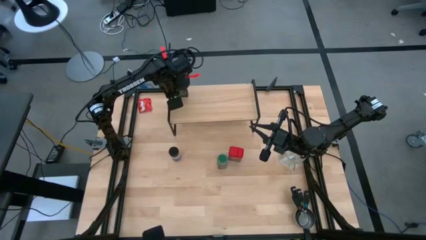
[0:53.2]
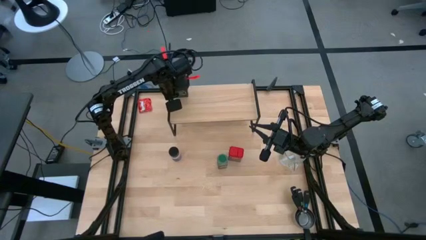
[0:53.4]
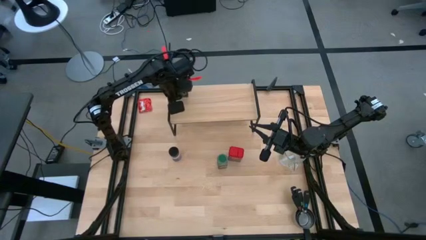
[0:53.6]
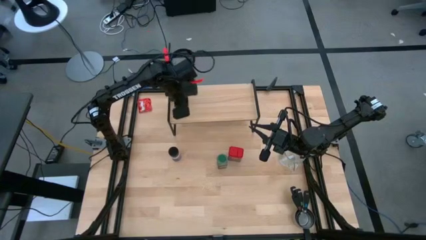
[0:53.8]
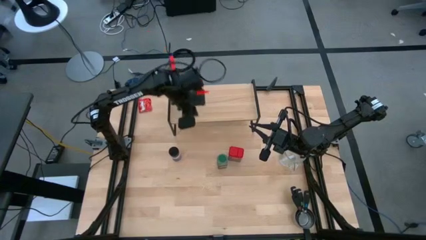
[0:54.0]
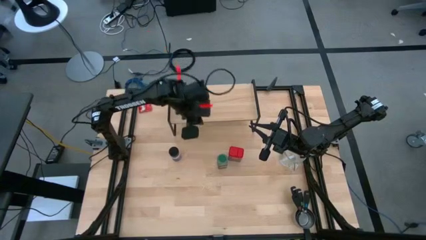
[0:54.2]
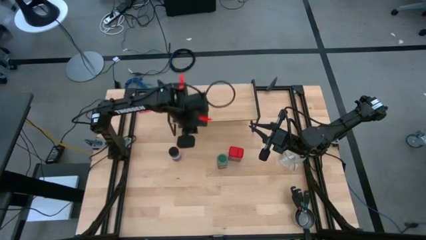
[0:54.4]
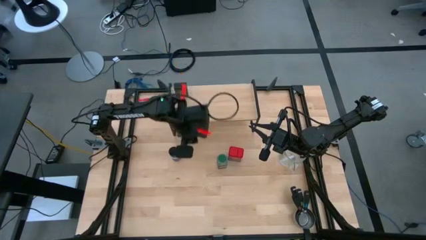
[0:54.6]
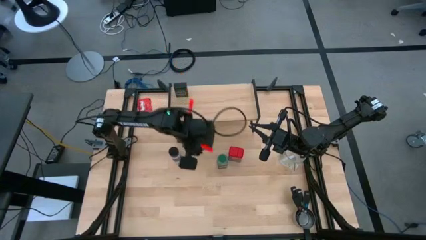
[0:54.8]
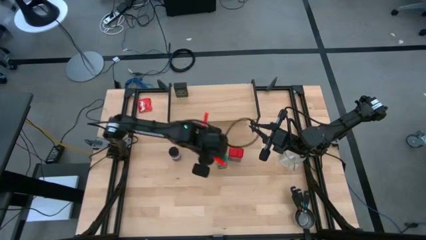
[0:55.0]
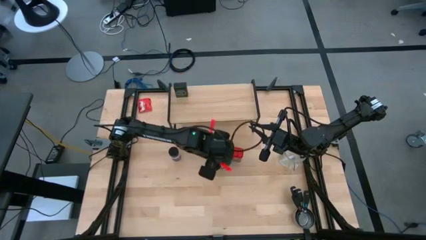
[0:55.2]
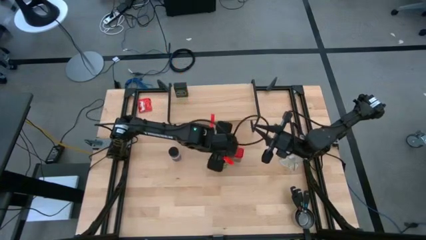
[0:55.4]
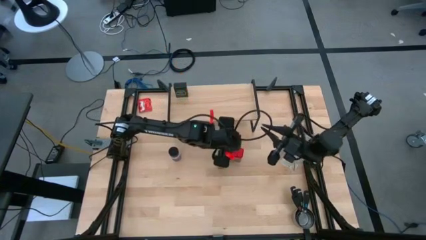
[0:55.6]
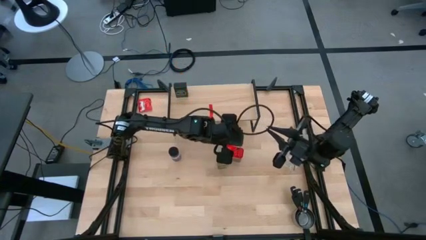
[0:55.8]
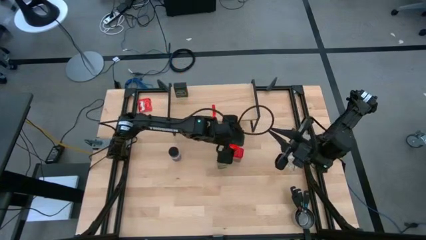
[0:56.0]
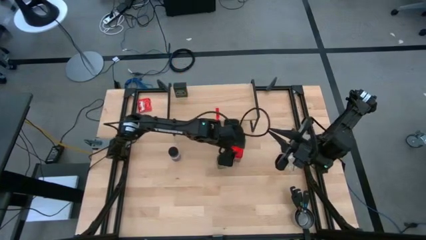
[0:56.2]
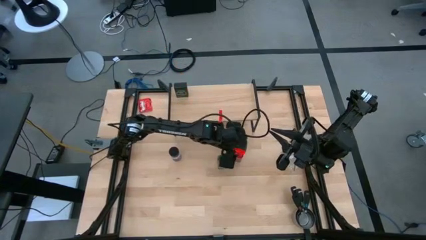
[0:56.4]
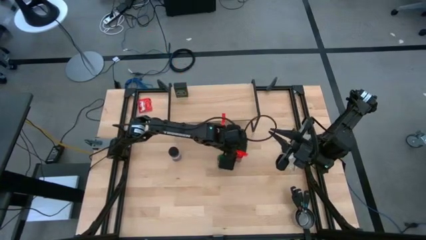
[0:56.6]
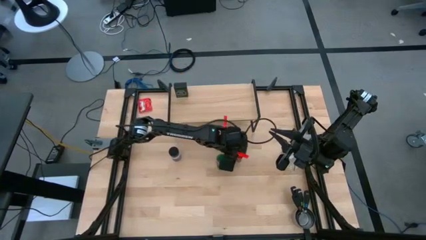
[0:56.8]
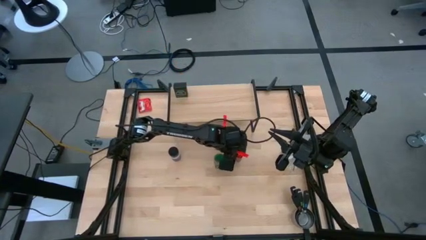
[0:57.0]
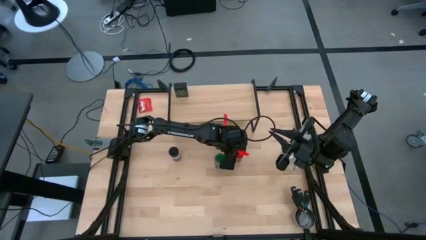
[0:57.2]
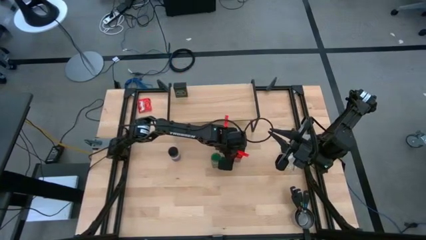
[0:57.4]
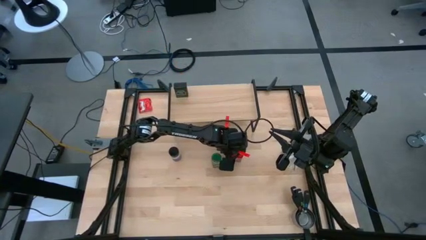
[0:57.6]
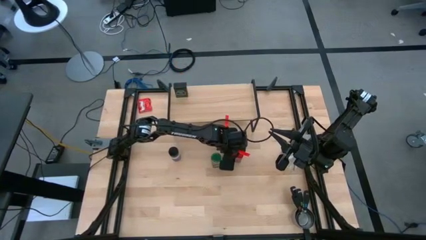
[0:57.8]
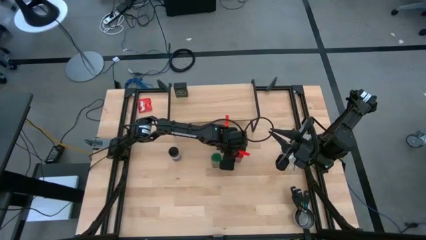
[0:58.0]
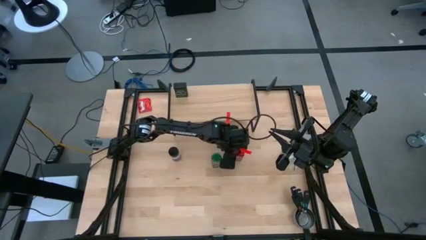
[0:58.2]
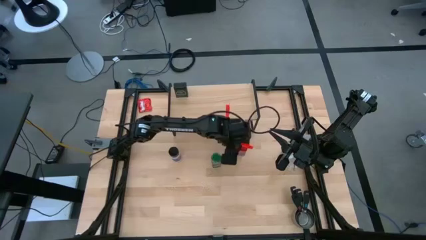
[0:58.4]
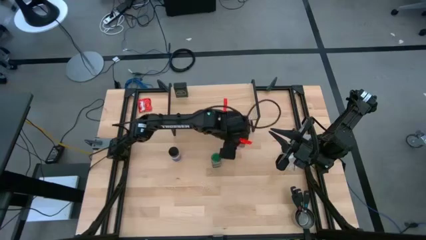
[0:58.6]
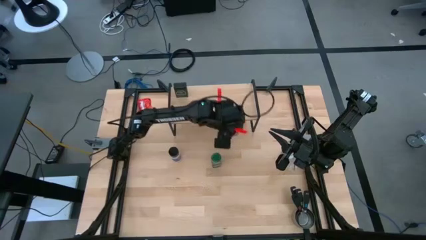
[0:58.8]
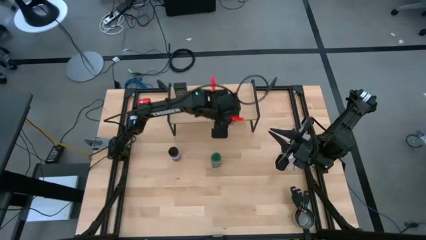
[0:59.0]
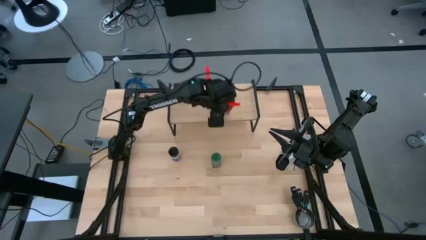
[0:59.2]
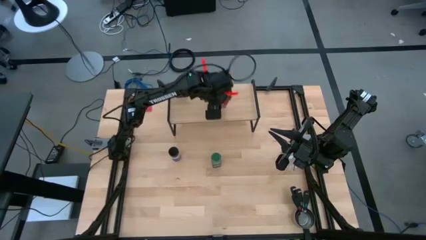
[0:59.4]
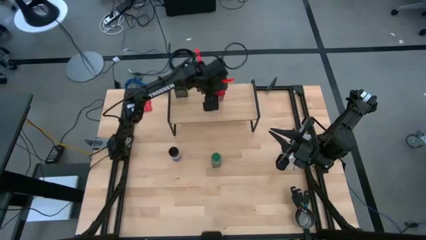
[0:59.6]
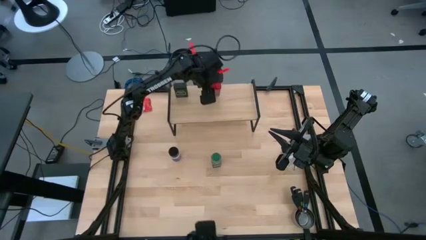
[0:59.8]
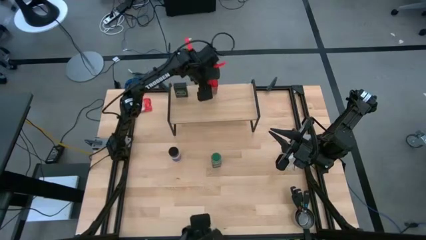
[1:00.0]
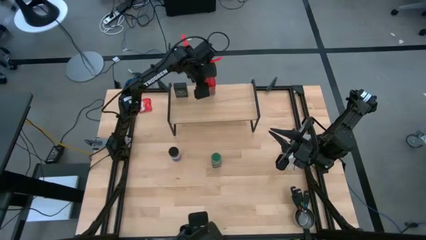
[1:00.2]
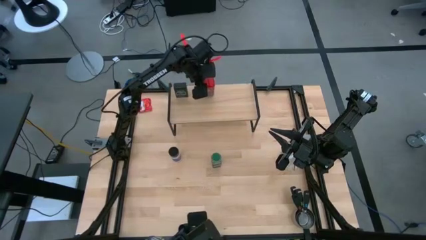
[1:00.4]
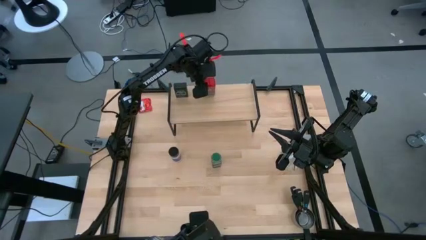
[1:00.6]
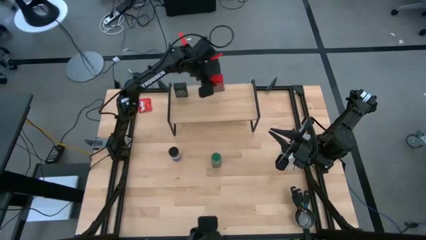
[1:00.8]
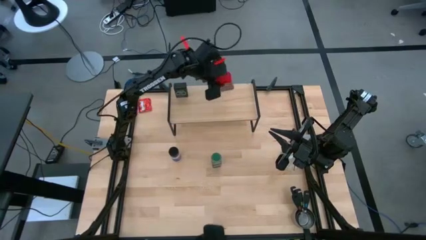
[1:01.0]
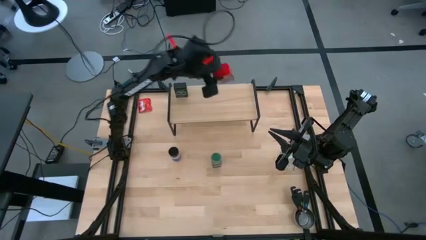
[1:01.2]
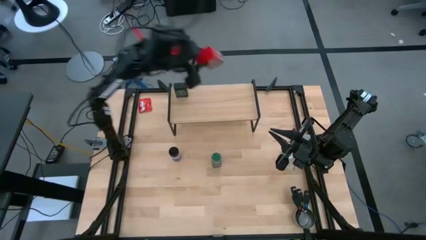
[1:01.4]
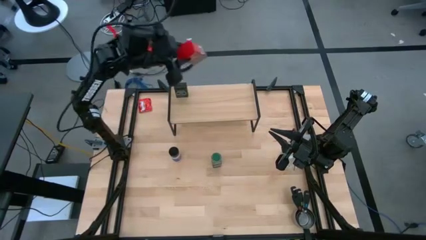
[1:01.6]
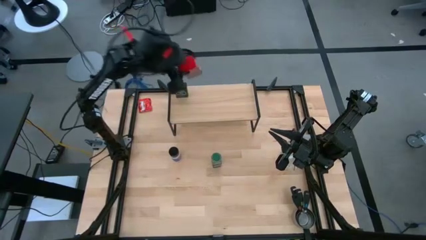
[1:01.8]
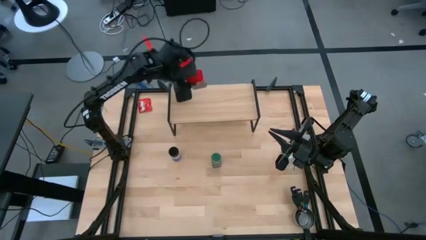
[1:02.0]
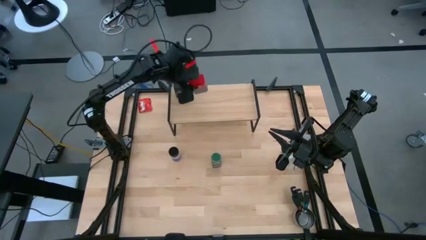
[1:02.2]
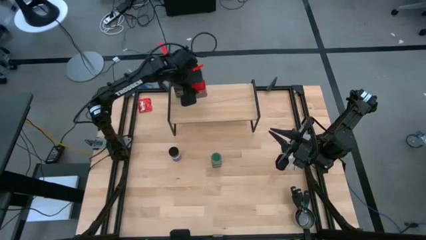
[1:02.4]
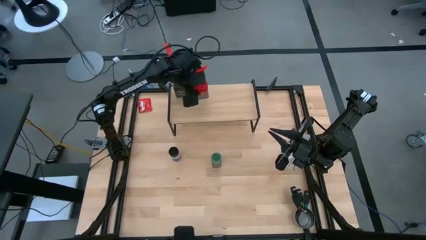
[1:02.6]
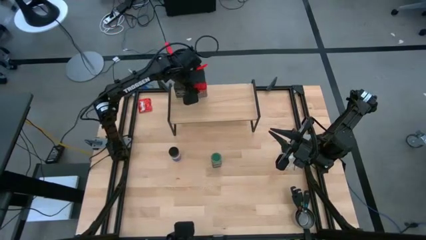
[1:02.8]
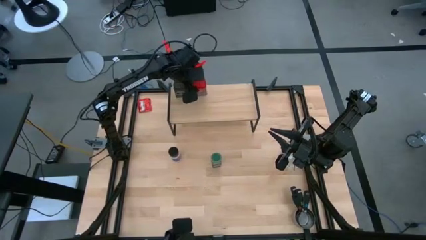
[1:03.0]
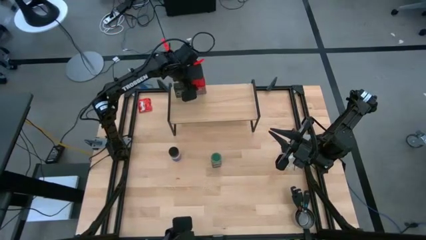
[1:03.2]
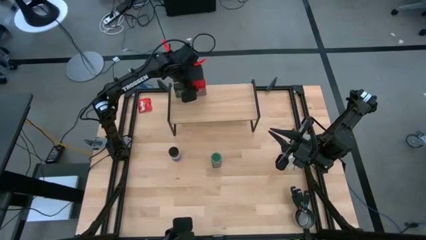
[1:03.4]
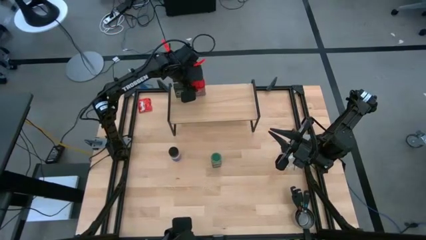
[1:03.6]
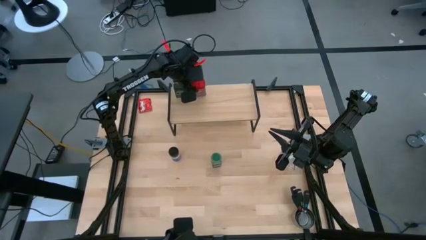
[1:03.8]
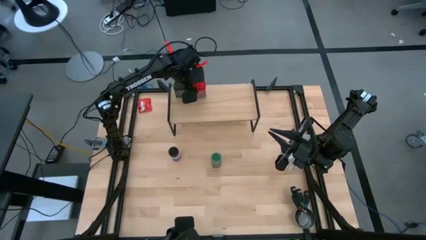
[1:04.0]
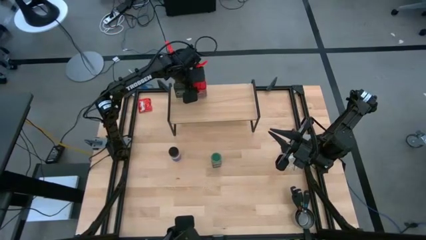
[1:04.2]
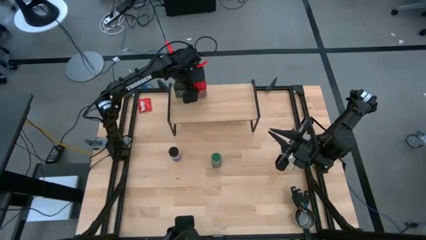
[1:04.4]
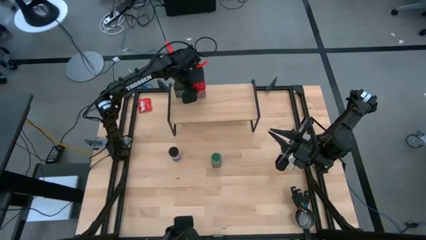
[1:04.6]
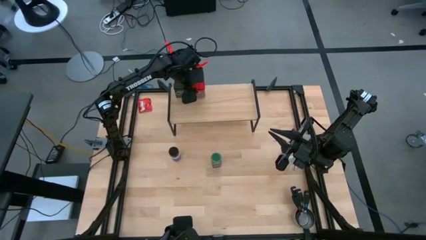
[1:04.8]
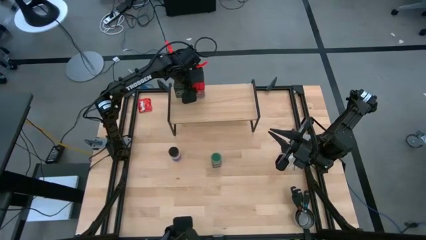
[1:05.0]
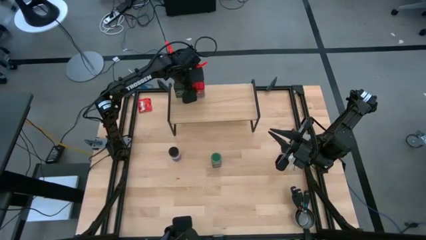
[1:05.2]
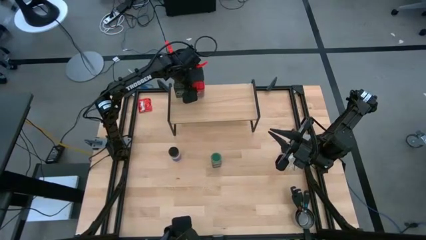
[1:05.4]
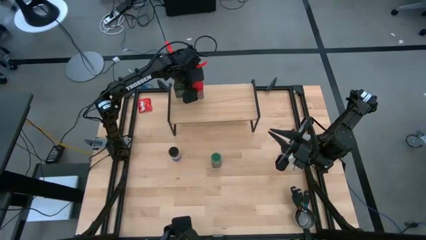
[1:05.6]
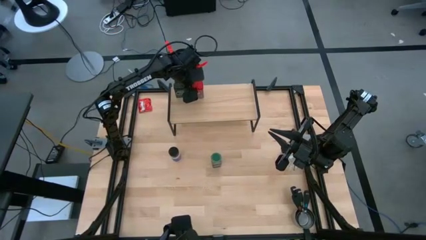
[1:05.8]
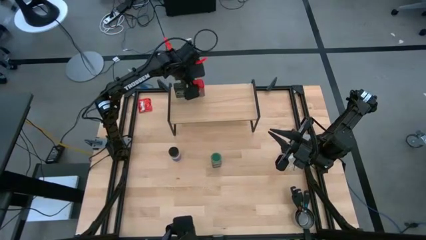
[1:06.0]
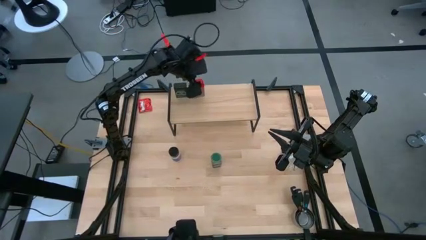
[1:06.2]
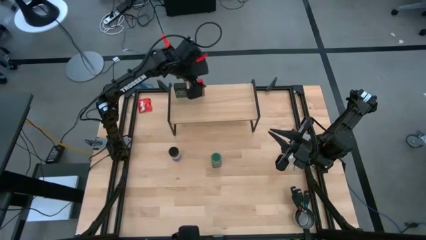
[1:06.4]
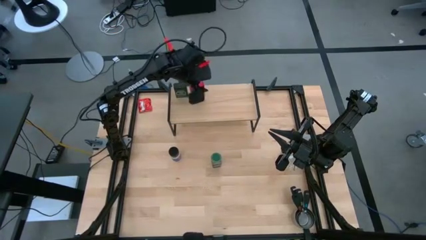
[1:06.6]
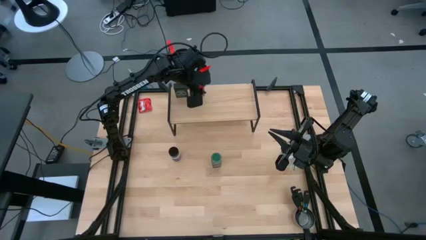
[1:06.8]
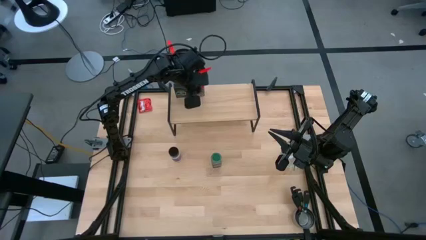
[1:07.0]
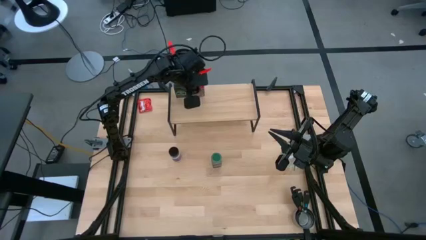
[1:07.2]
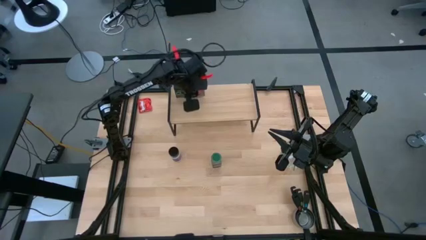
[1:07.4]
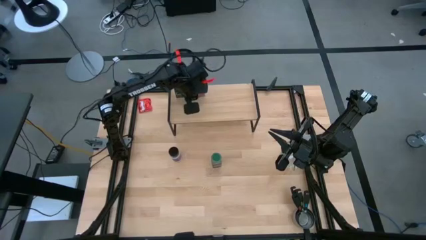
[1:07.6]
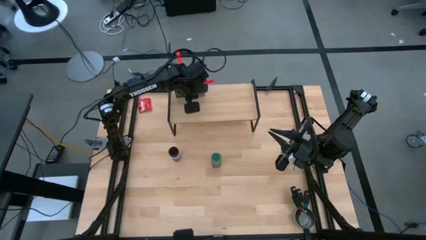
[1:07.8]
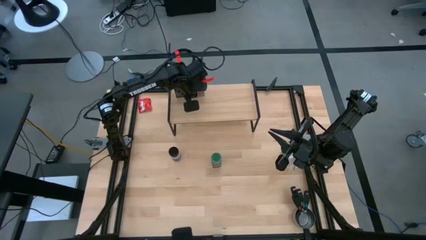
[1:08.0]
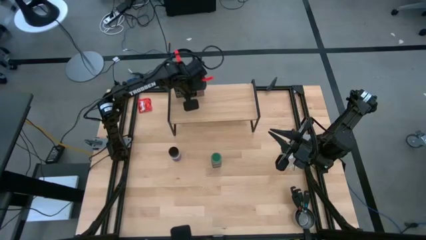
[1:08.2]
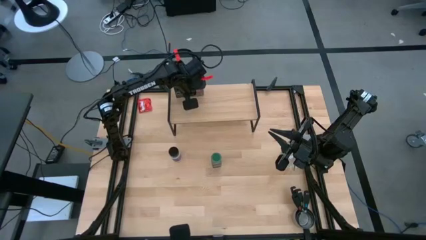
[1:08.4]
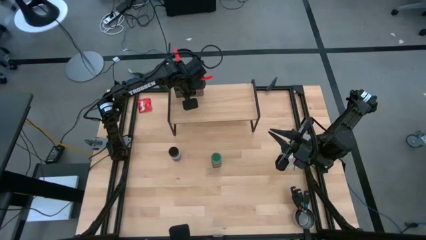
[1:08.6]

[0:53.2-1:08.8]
Task: Shelf spices
Put the red seasoning can on the shelf
